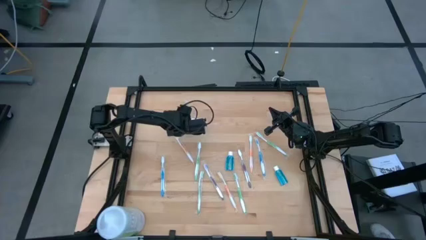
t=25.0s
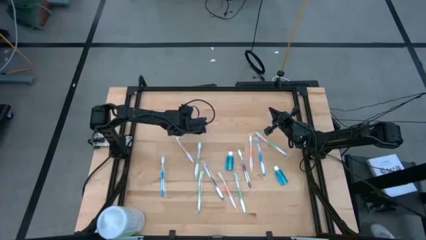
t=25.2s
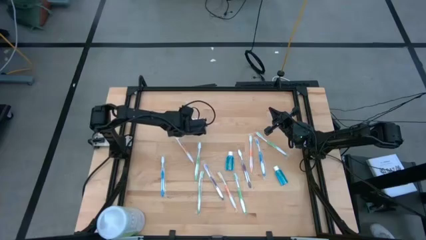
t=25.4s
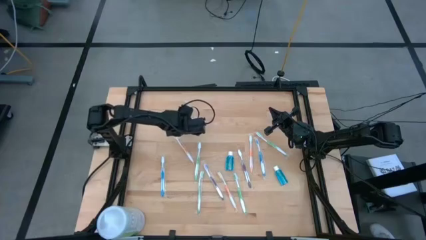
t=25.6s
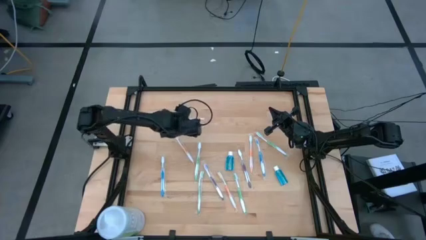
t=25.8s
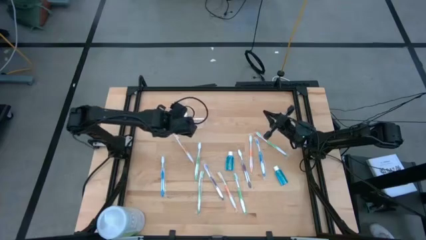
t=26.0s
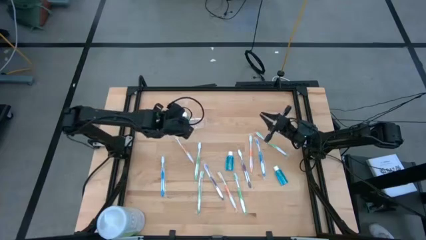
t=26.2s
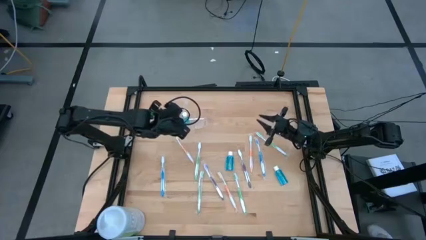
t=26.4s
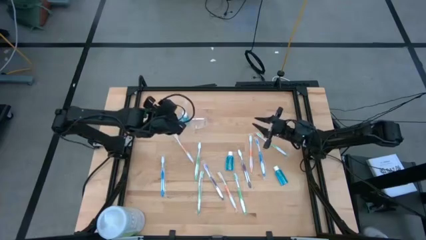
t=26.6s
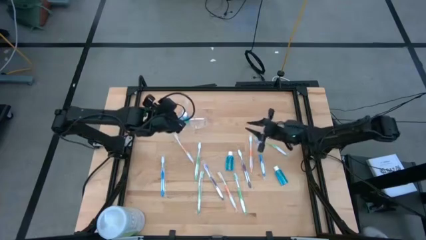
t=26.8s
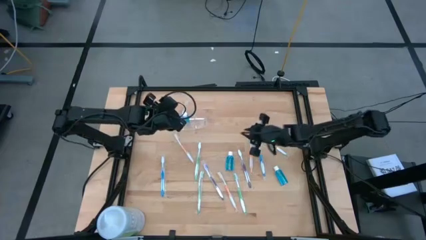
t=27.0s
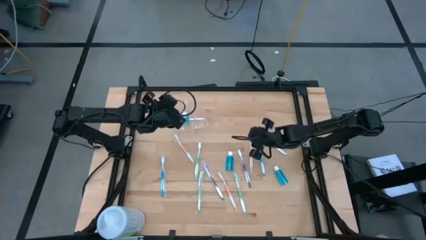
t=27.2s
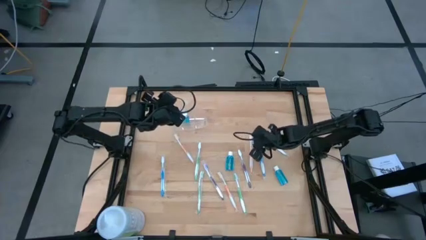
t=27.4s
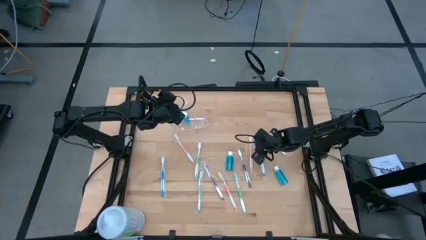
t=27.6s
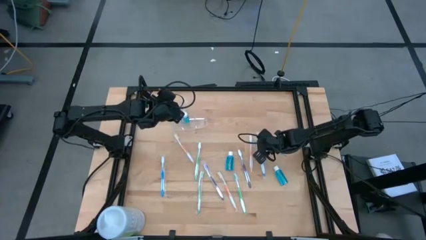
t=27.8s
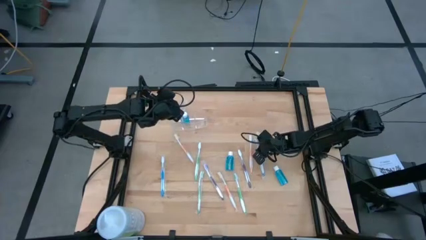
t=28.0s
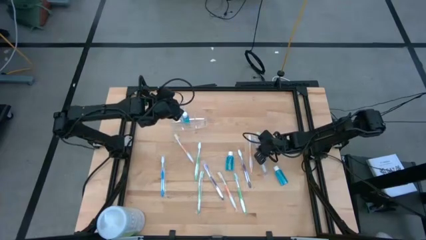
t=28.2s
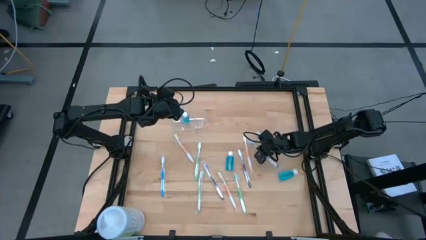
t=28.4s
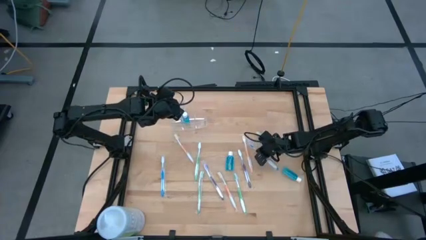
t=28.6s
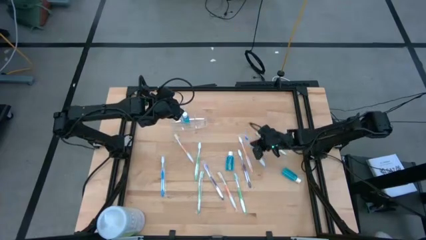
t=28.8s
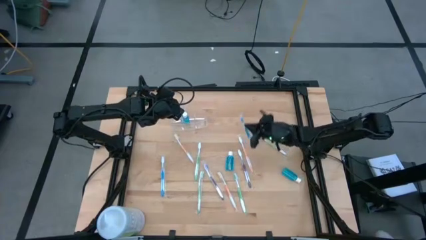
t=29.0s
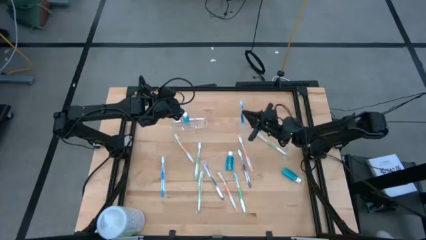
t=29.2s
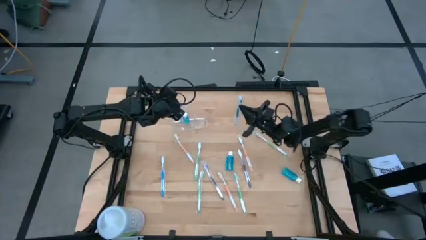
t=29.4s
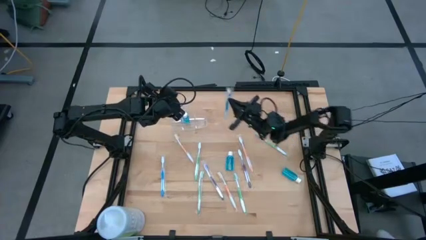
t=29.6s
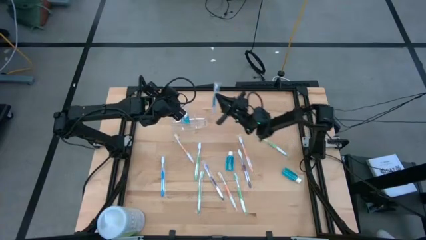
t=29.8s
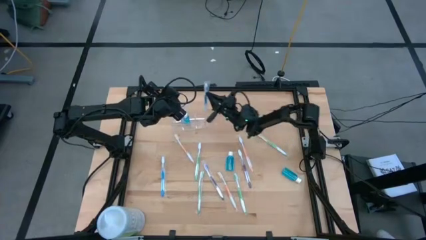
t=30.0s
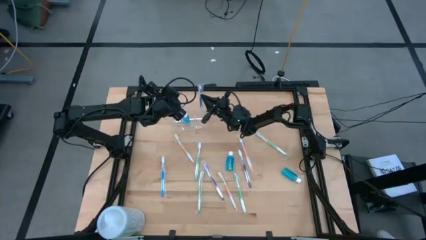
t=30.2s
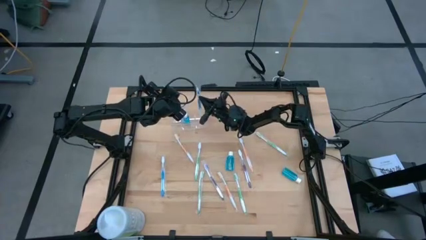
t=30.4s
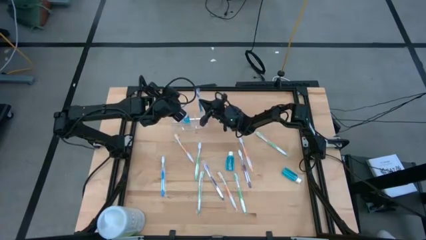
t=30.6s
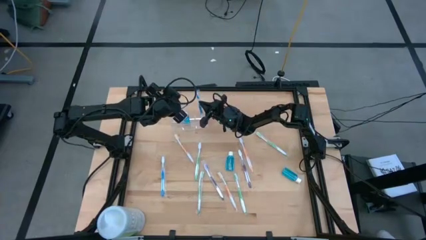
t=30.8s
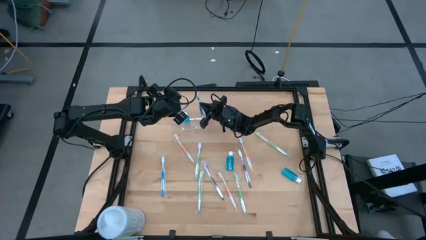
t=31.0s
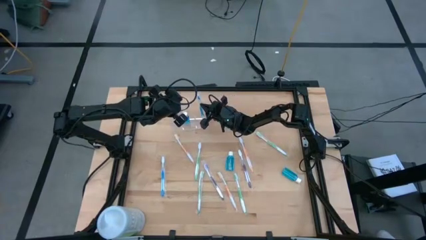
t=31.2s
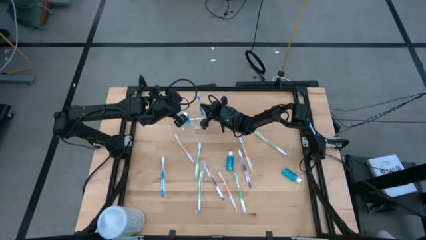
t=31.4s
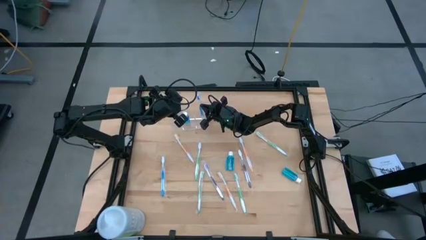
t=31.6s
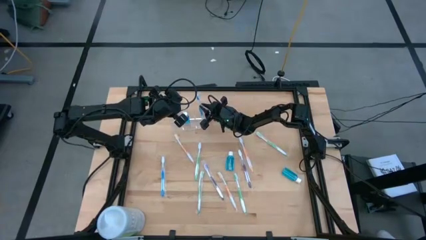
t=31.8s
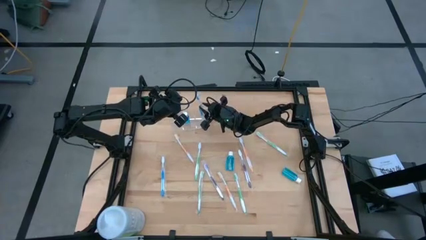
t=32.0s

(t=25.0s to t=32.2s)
Task: Pick & Place toothbrushing station
Put the blue toothbrush into the transparent organizer

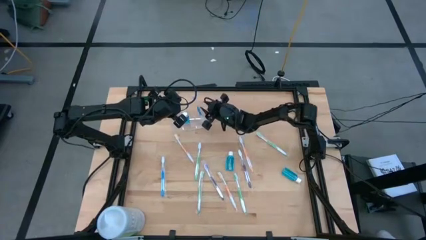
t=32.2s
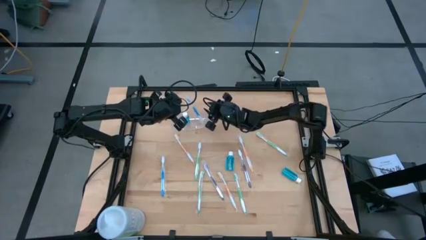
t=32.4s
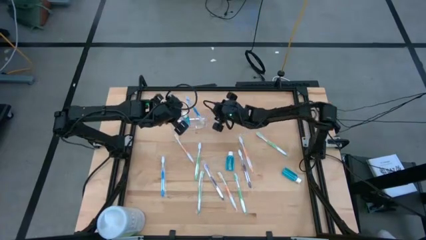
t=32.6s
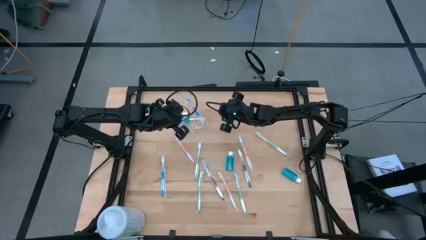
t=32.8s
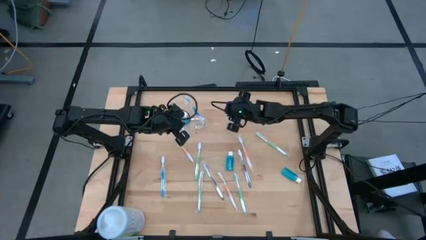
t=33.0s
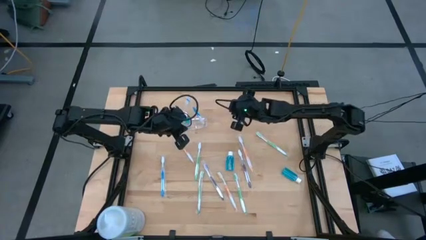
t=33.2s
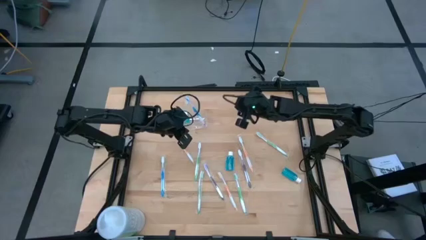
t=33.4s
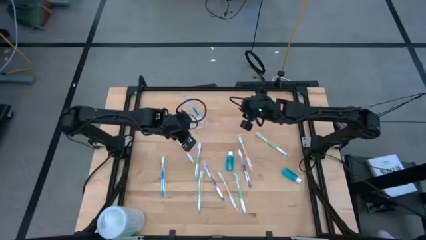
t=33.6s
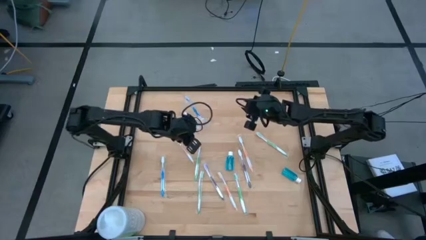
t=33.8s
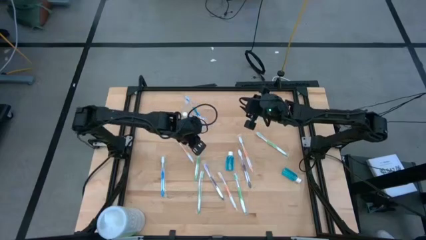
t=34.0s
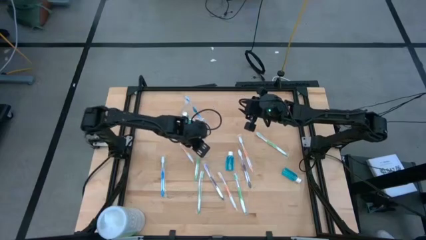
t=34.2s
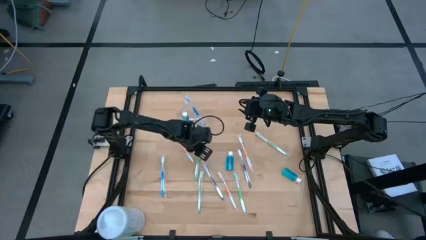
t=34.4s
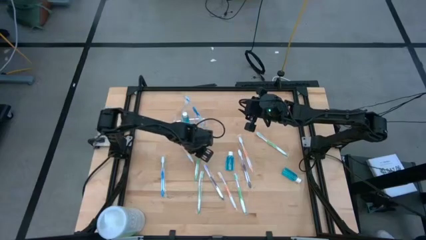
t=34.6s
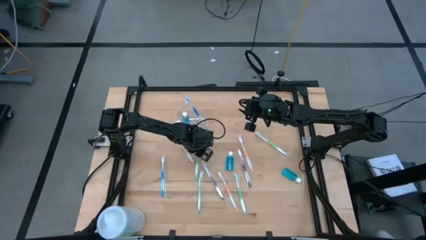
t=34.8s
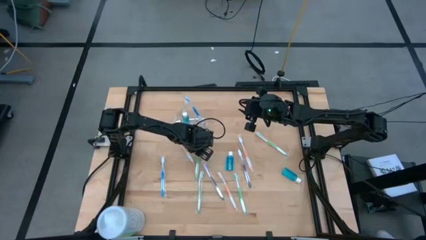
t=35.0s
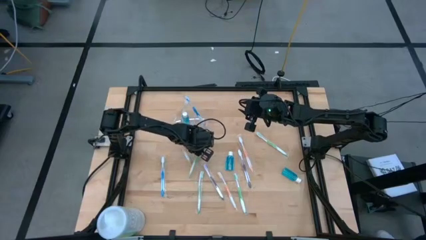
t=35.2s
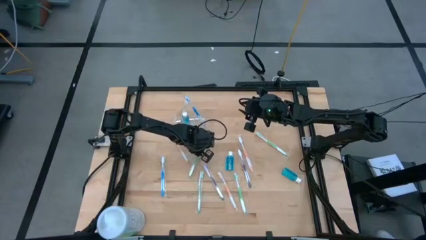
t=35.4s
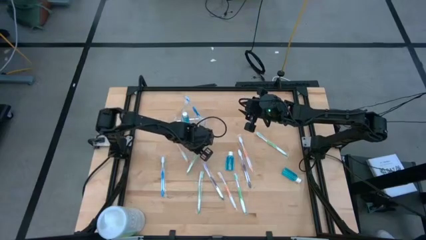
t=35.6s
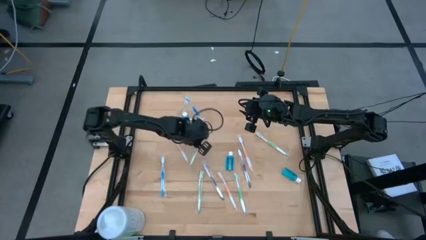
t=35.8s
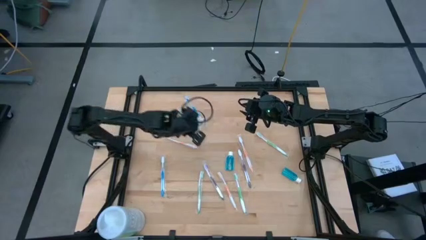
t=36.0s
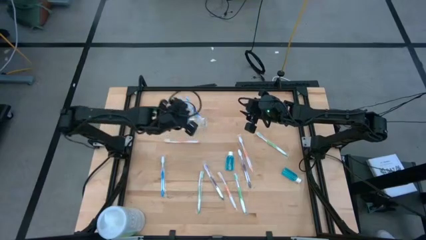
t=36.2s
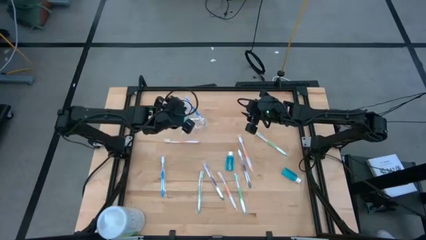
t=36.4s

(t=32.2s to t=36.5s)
Put the green toothbrush into the transparent organizer

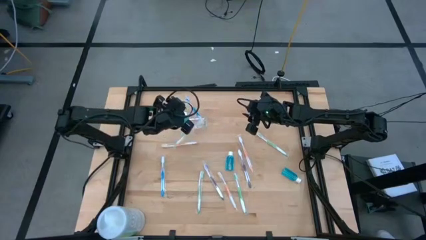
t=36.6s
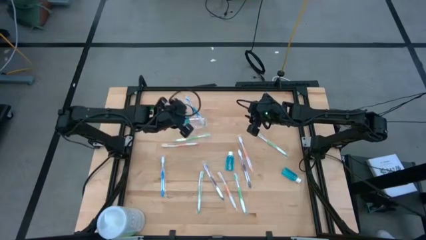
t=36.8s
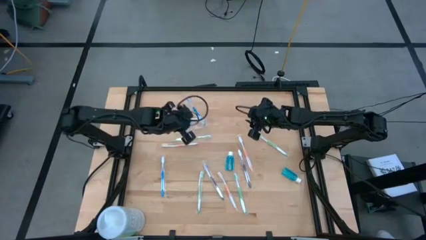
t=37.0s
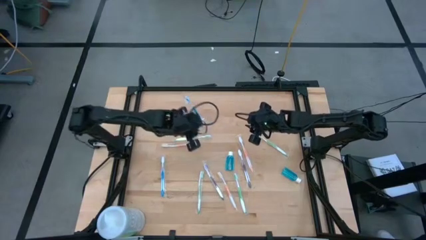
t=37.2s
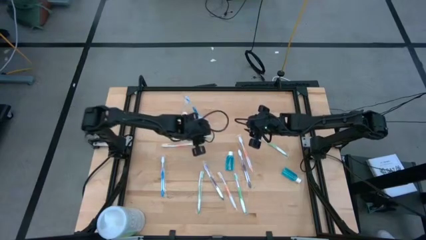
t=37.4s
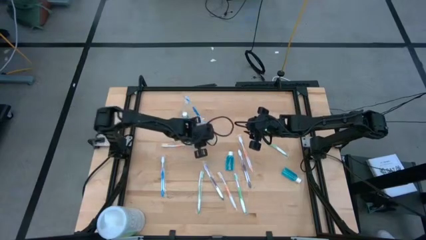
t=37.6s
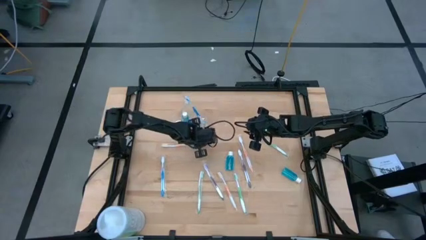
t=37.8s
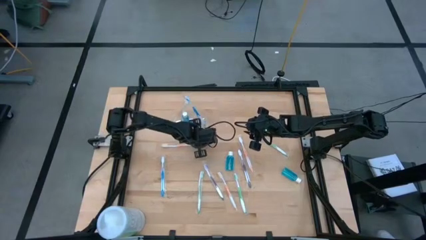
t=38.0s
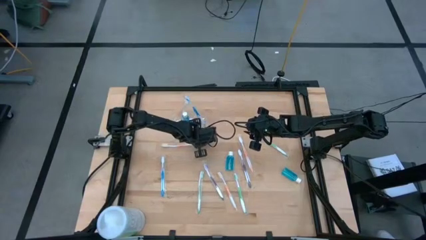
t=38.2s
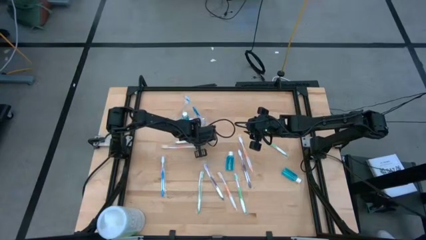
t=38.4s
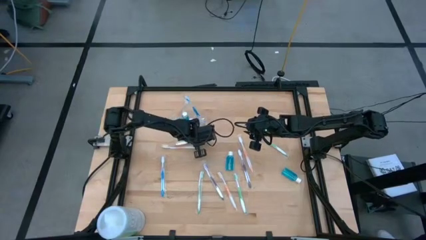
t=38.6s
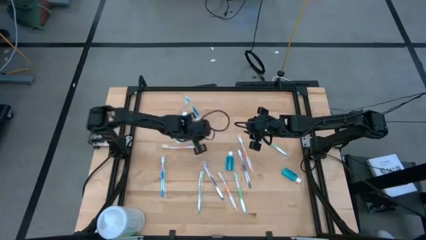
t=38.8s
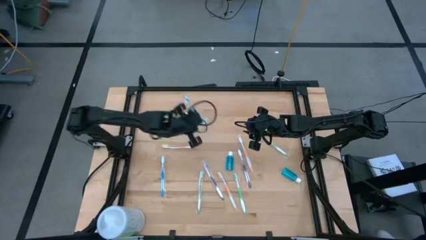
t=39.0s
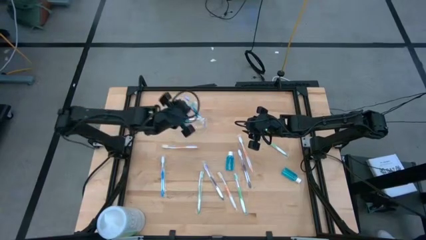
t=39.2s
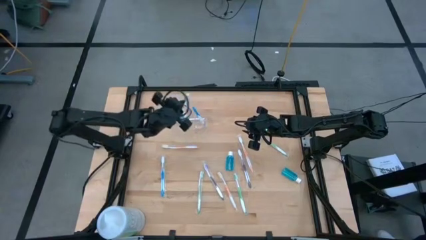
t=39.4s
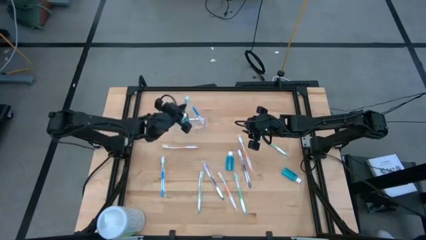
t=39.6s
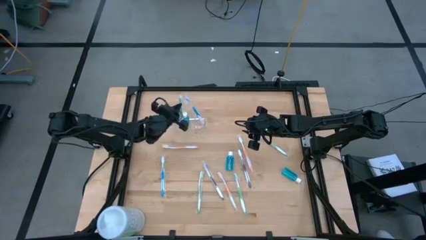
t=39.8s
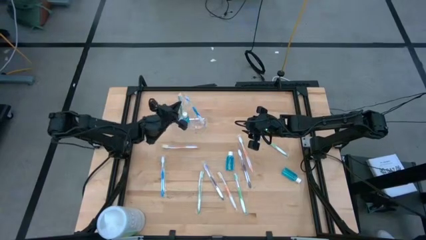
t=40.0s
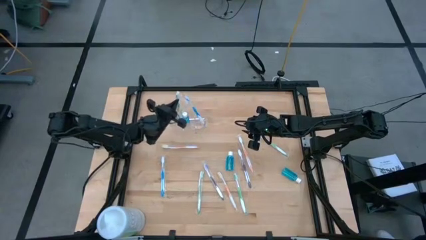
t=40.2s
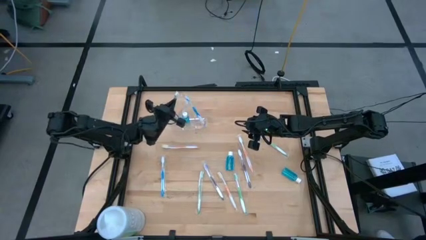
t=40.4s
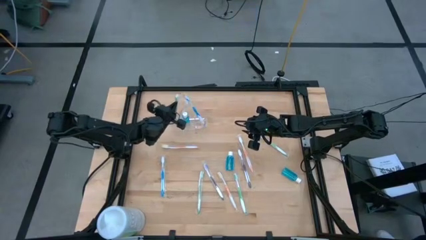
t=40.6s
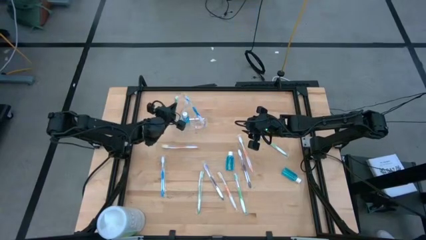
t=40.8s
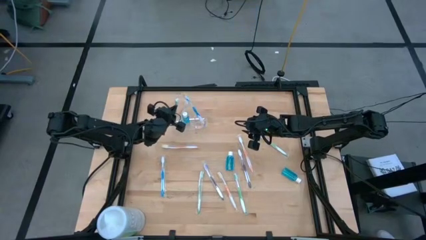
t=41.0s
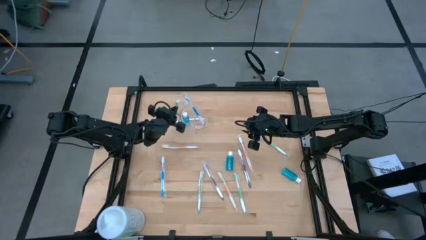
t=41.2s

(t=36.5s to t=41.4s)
Put the green toothbrush into the transparent organizer
